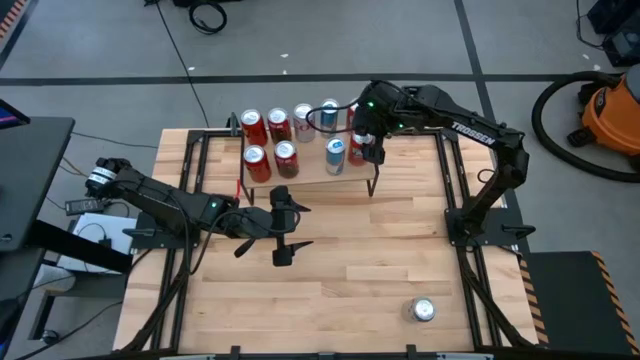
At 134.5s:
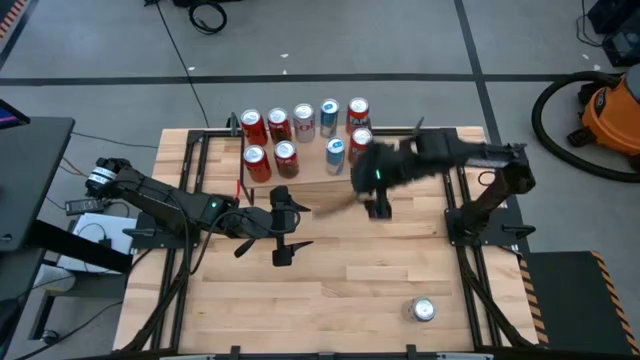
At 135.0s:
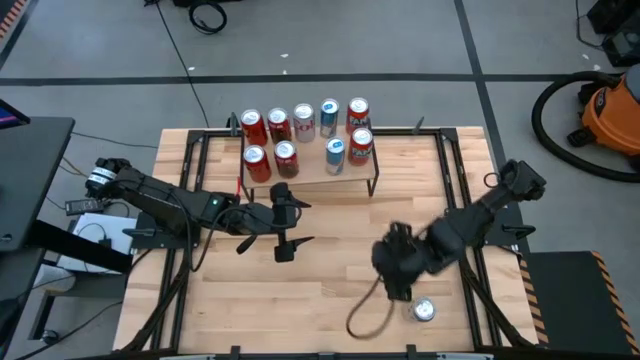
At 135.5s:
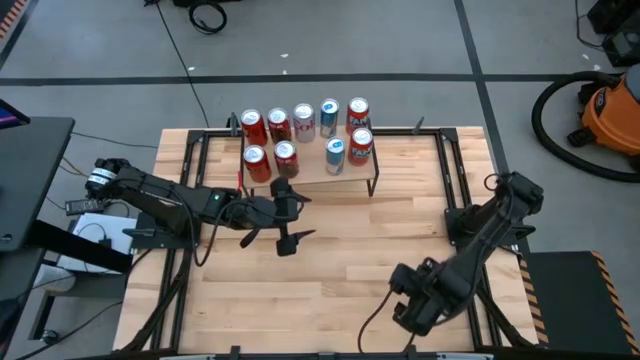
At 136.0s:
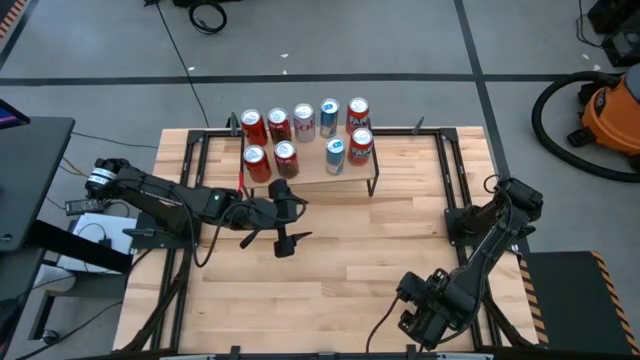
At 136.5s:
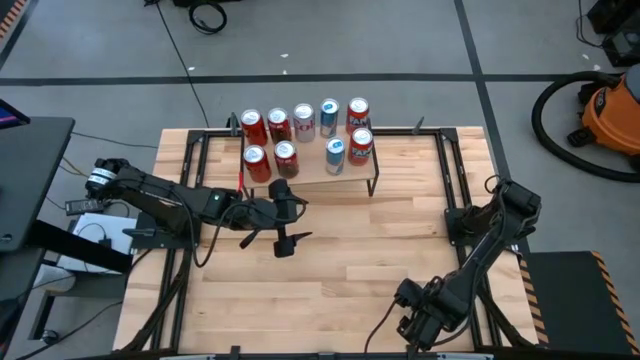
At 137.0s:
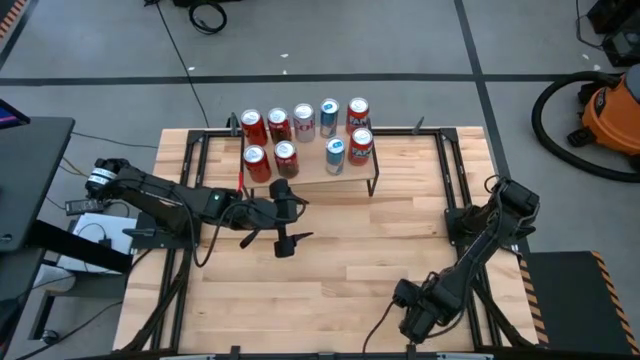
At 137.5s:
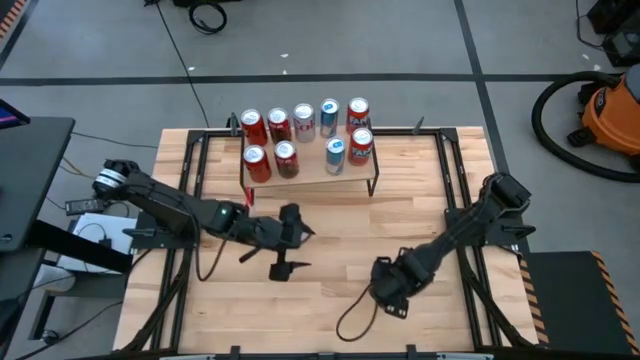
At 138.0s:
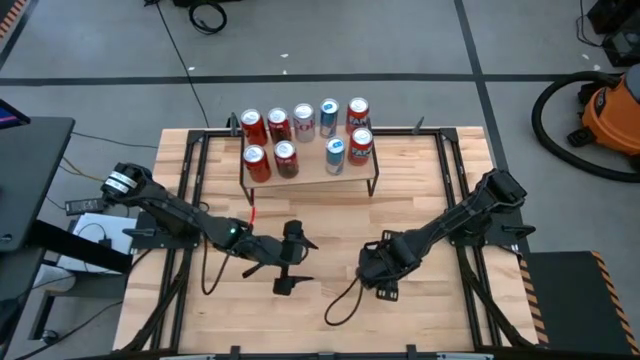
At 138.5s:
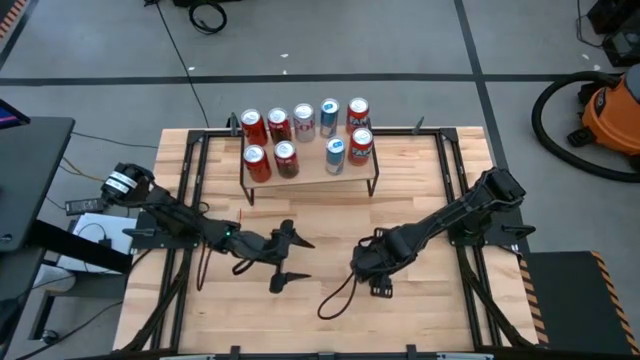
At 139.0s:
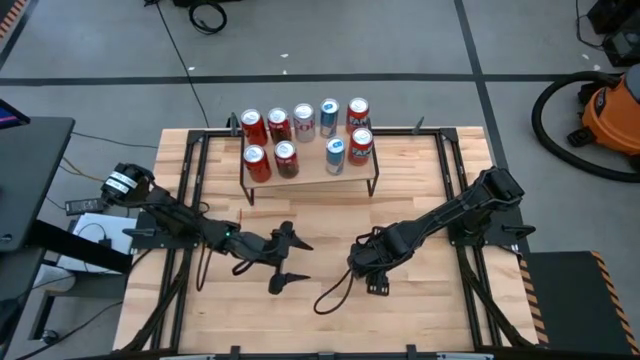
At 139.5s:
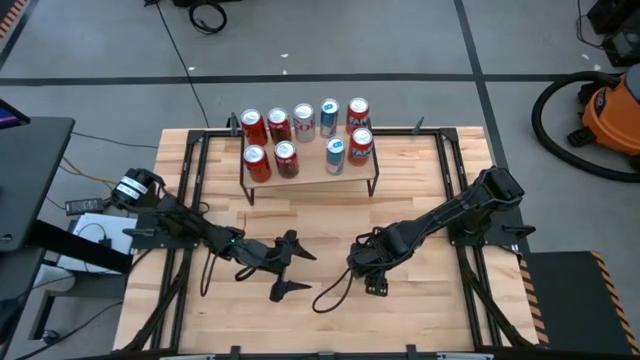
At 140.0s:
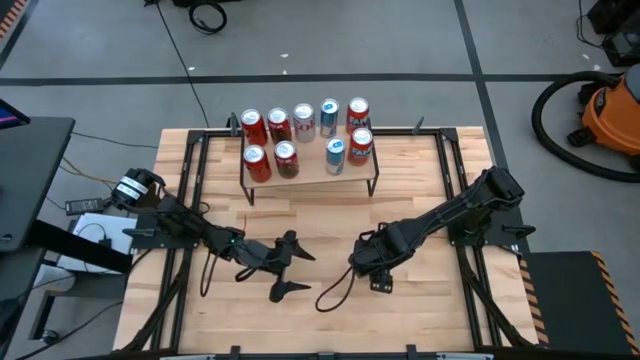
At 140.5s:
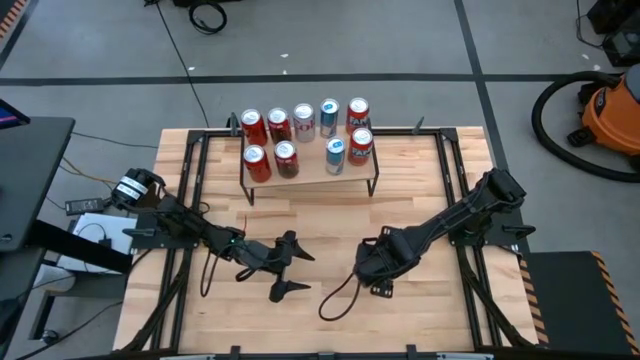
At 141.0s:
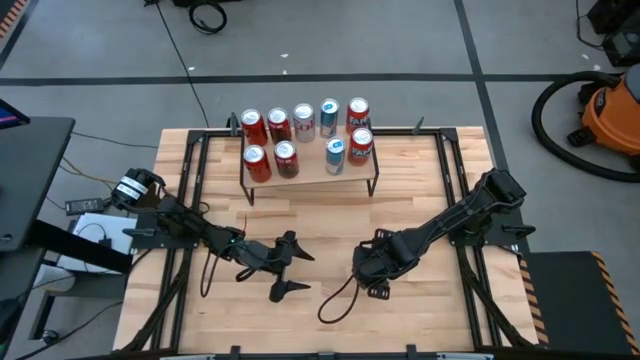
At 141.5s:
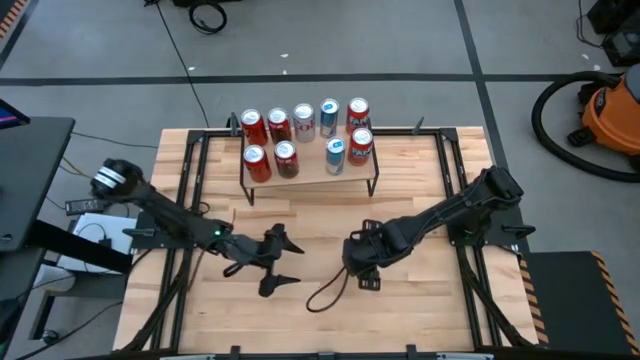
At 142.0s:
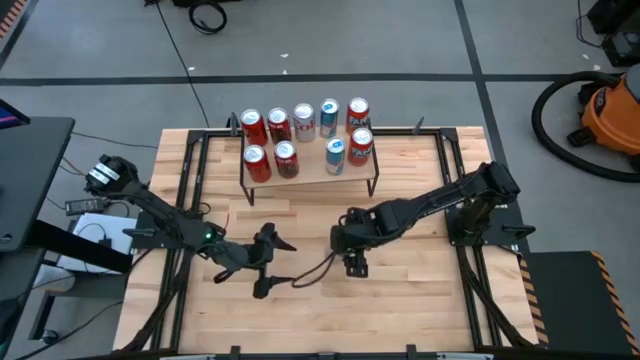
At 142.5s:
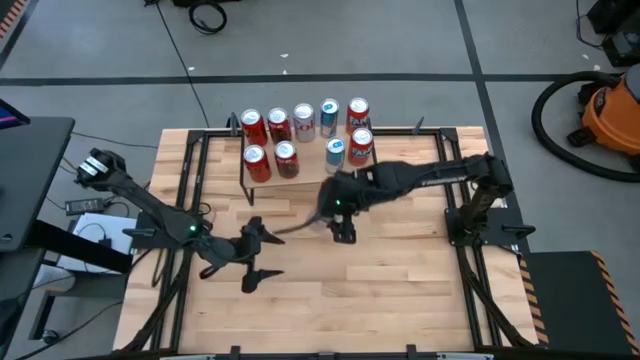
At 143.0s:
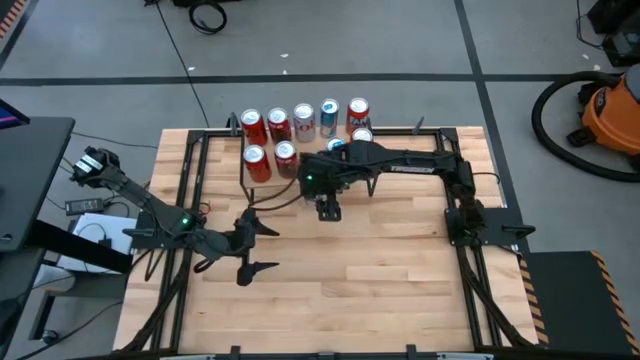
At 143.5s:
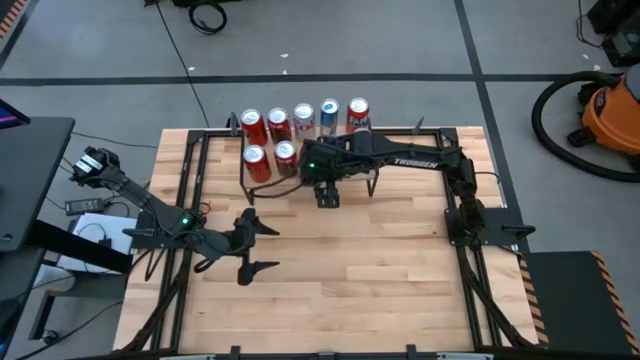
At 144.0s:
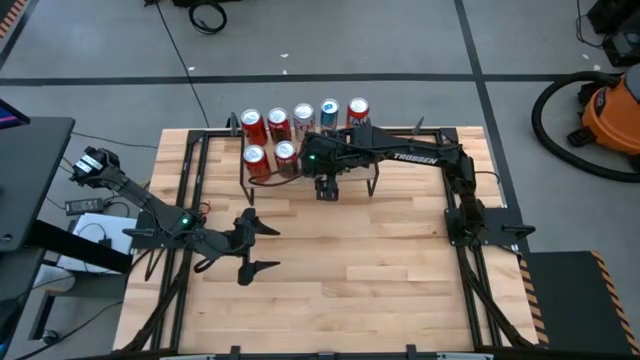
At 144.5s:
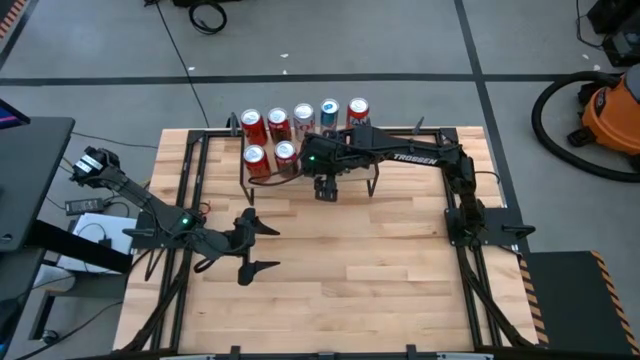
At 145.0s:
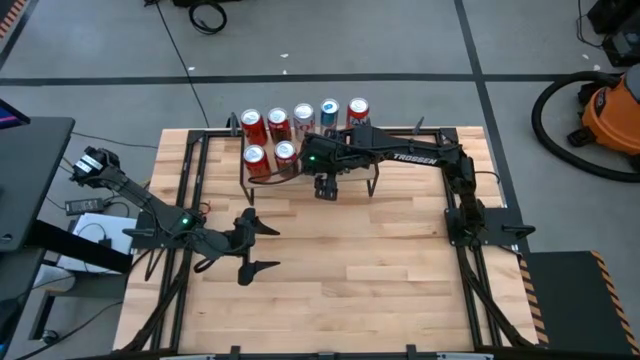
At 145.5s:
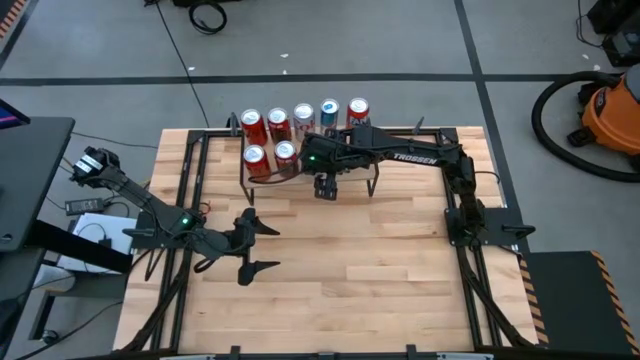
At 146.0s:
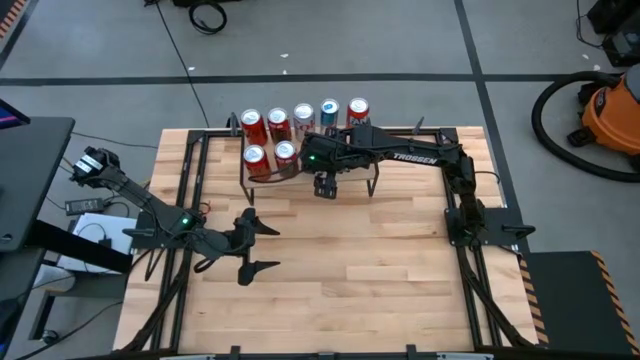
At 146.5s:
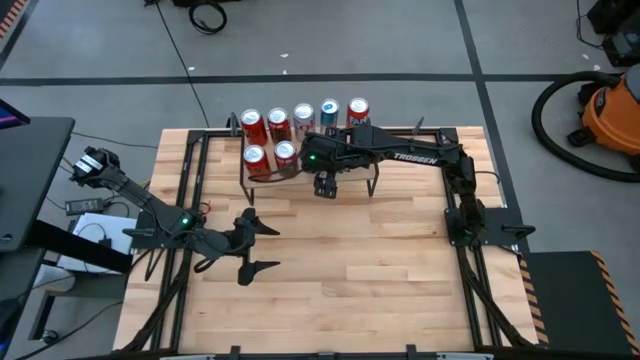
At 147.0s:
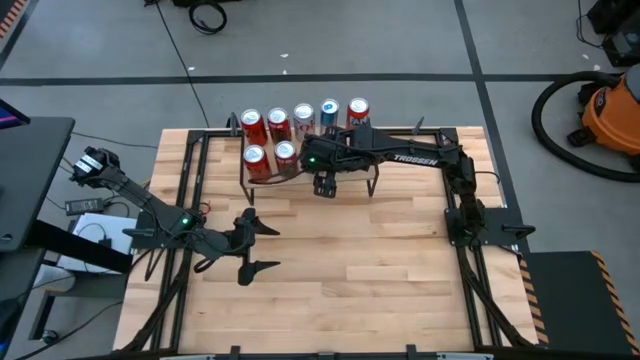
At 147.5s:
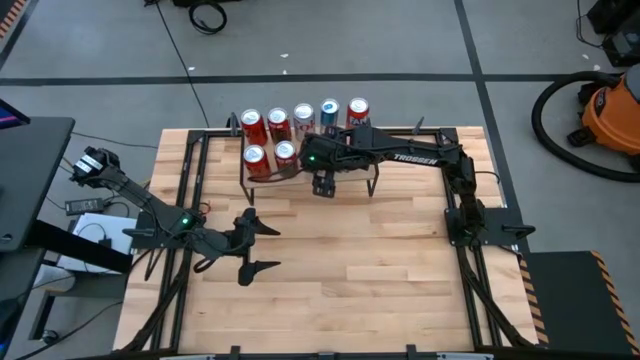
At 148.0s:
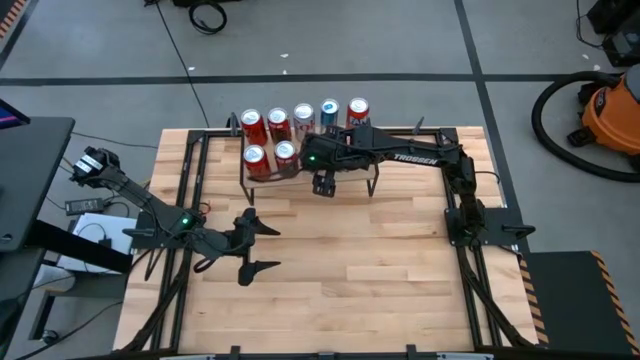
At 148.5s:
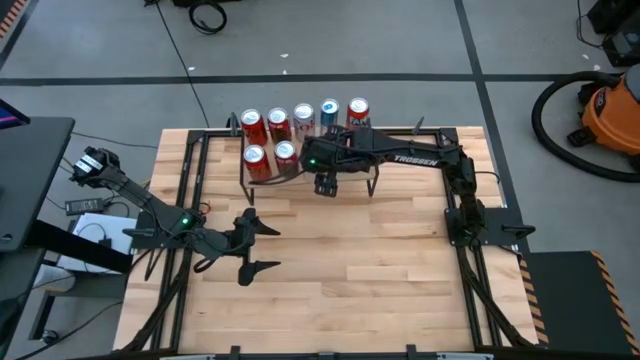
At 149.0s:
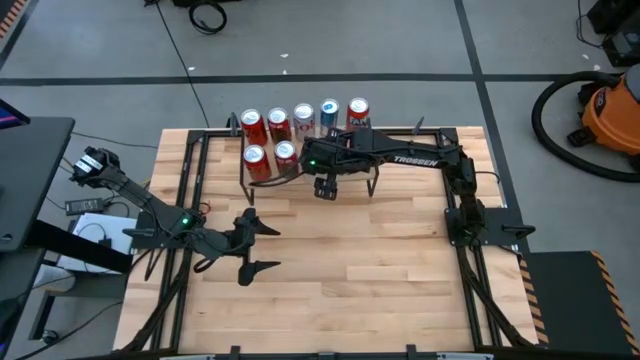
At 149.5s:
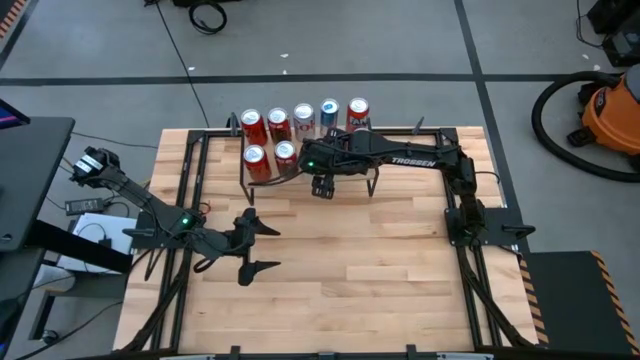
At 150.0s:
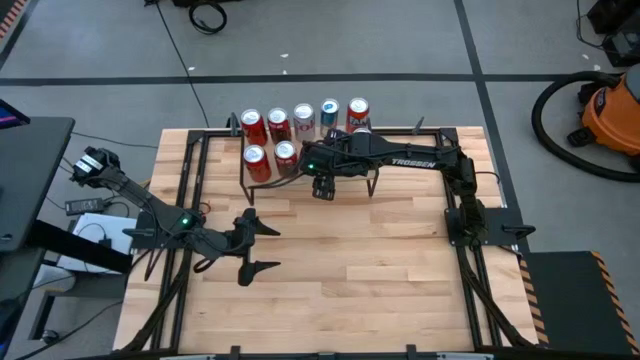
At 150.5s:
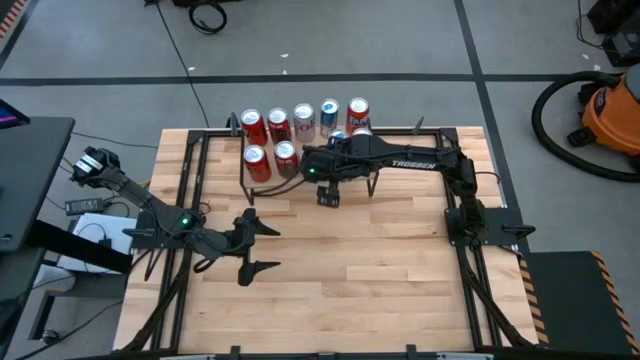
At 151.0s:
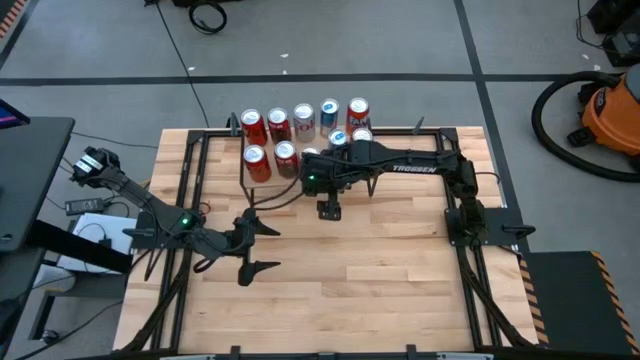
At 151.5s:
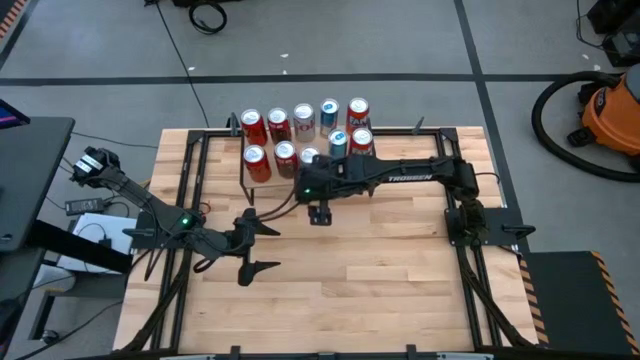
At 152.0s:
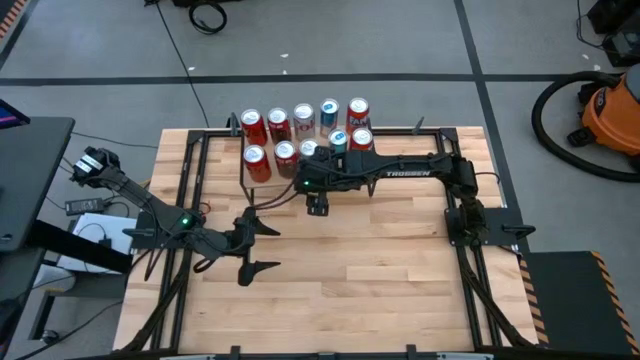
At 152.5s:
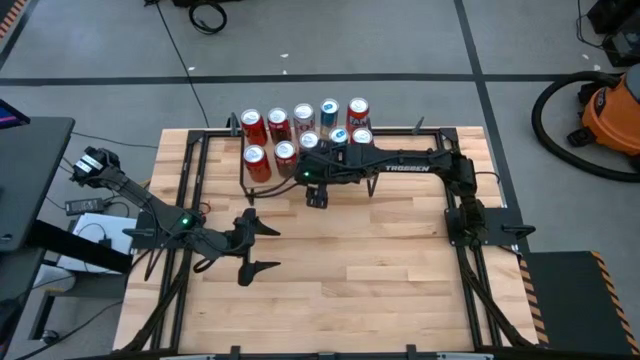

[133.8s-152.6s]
Task: Place canned beverage on shelf
Put the silver soda can on the shelf aligned with the other silver soda can

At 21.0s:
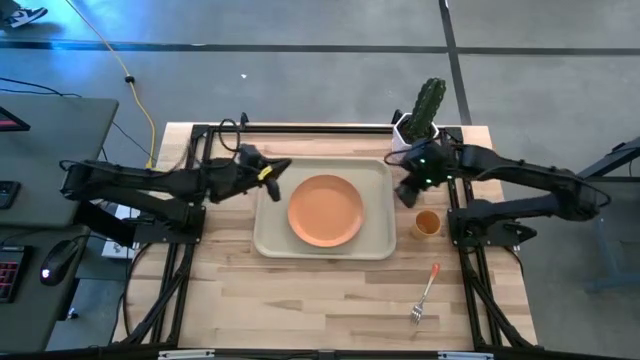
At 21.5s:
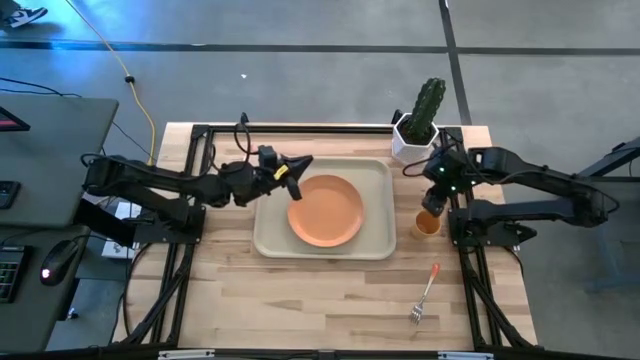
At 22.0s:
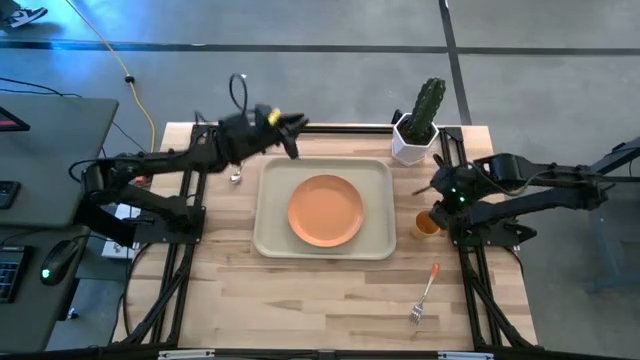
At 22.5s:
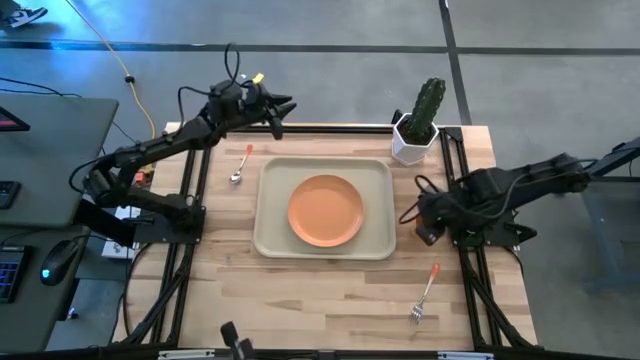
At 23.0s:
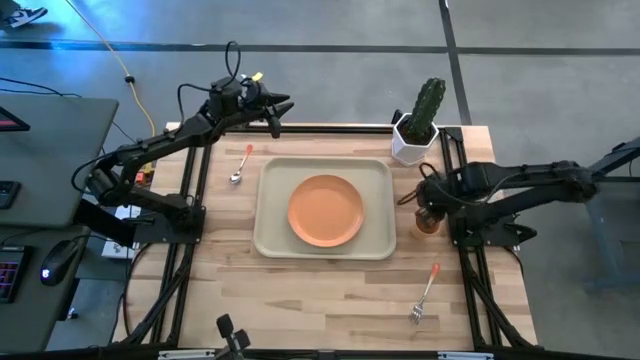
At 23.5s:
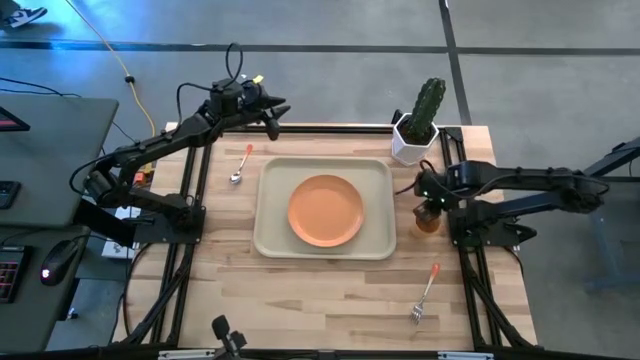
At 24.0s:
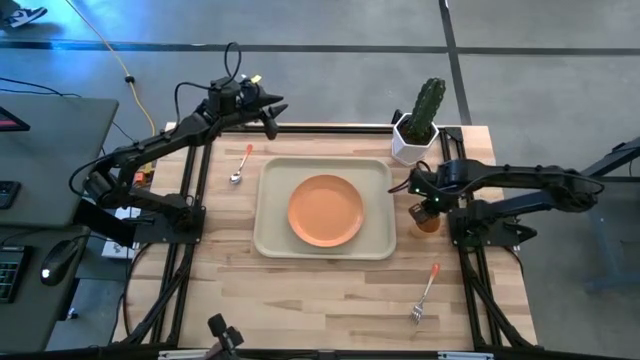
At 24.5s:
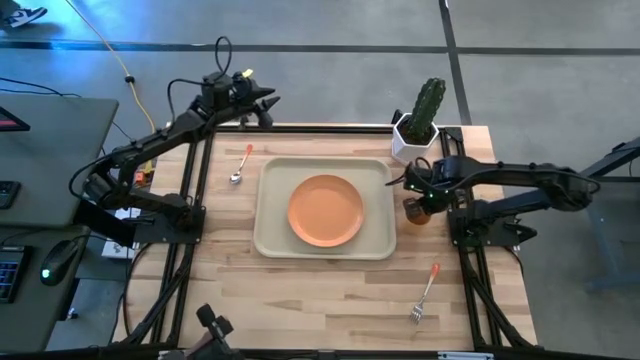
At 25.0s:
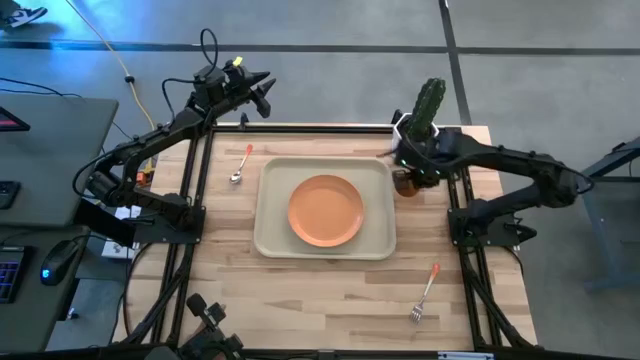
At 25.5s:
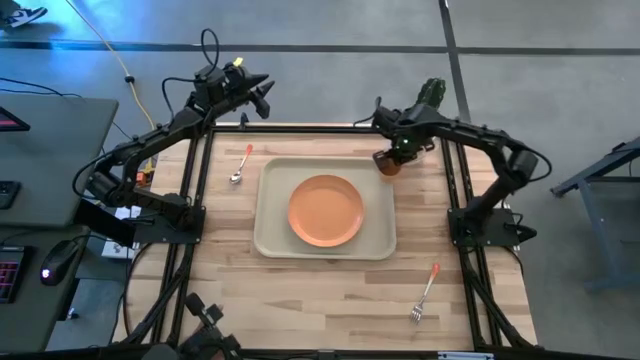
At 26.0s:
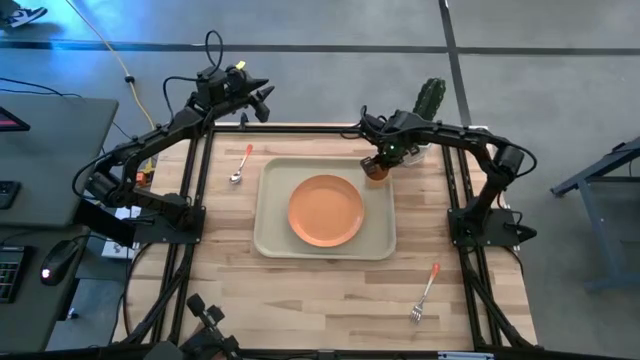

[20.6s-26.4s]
Task: Pick and place plate/cup/fork/spoon on tray
Put the orange cup on the brown tray on the top right of the orange plate
